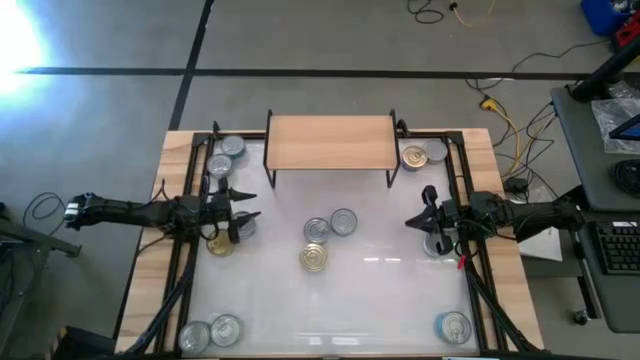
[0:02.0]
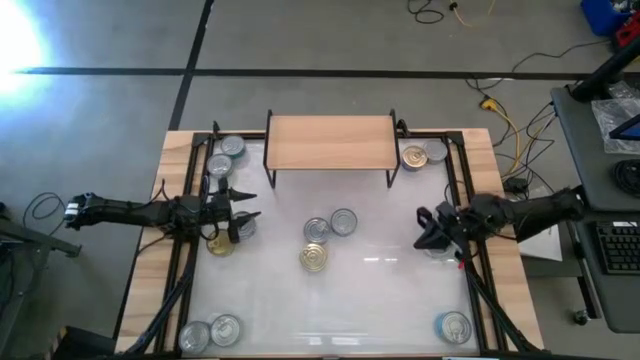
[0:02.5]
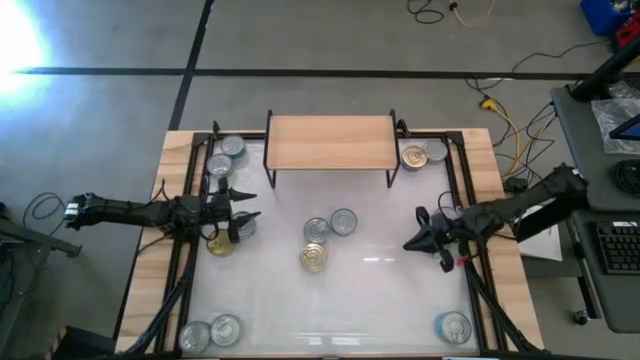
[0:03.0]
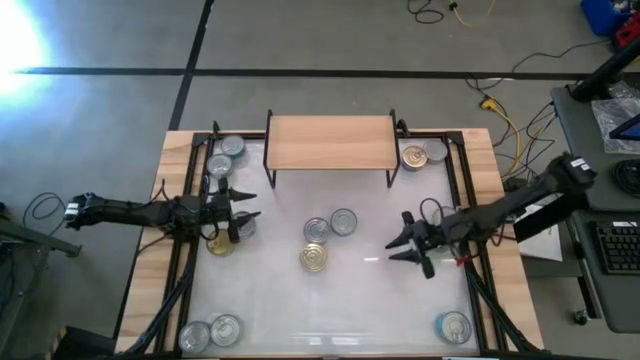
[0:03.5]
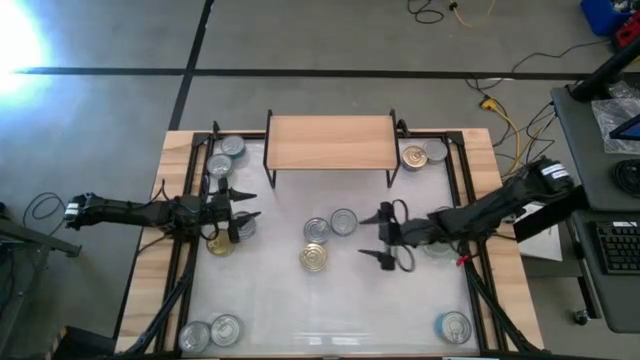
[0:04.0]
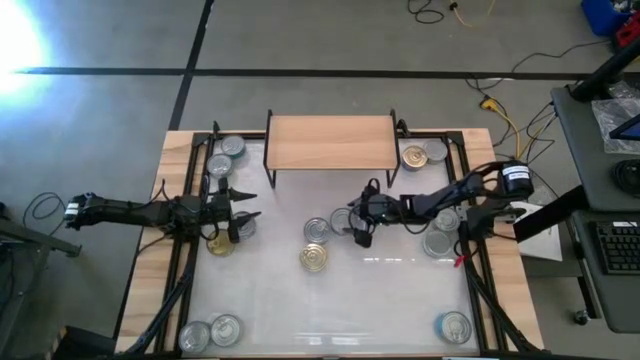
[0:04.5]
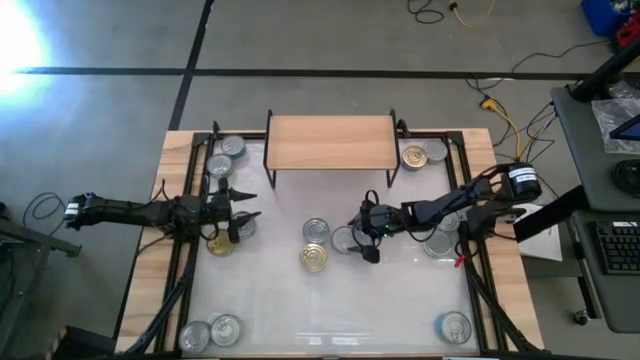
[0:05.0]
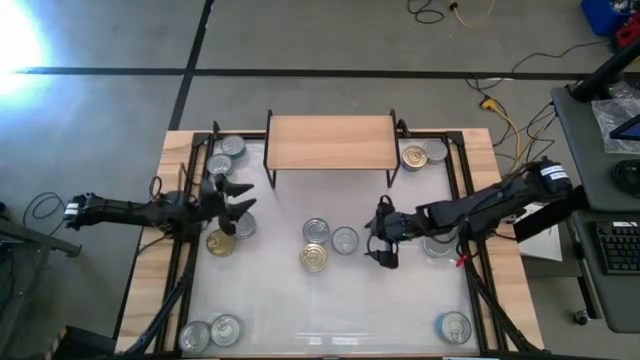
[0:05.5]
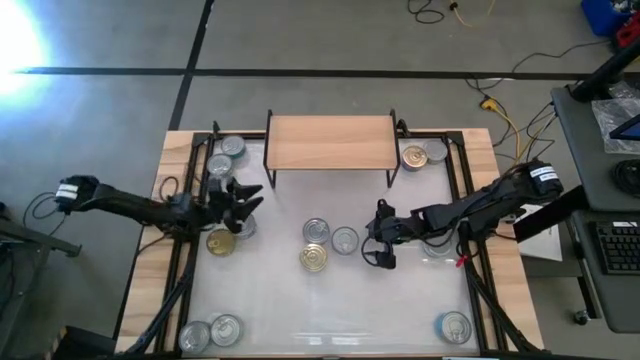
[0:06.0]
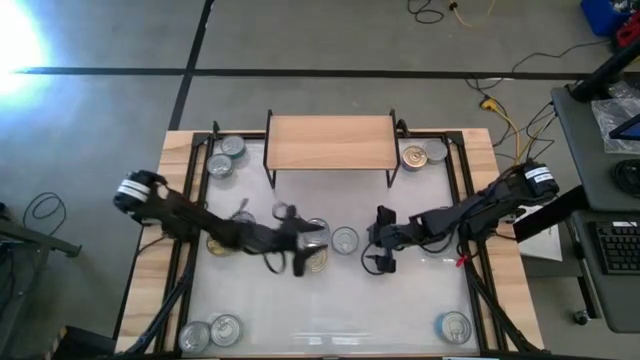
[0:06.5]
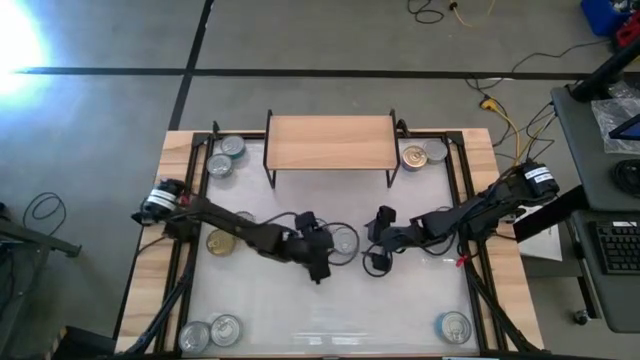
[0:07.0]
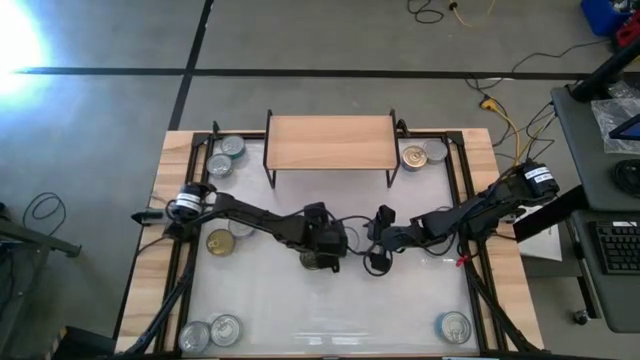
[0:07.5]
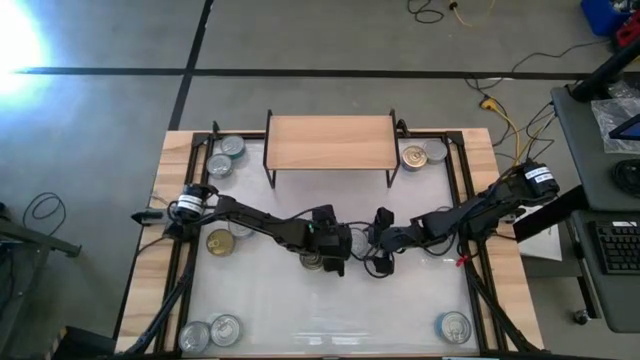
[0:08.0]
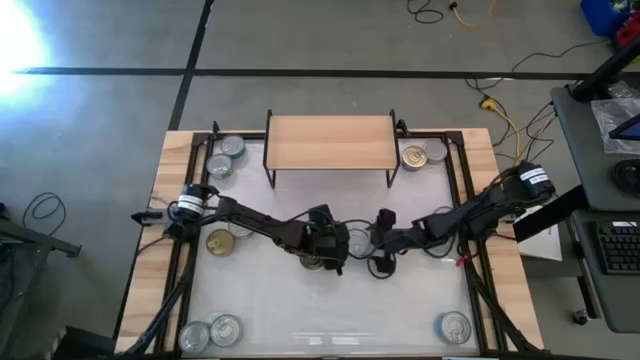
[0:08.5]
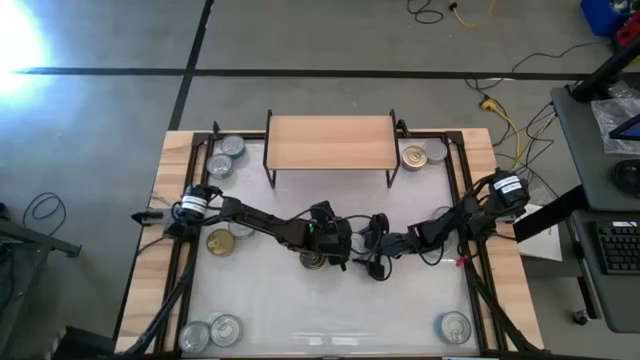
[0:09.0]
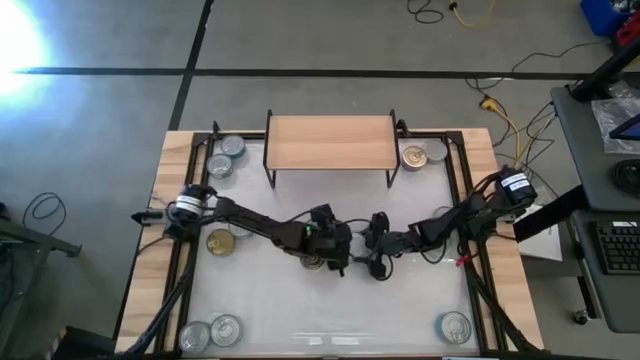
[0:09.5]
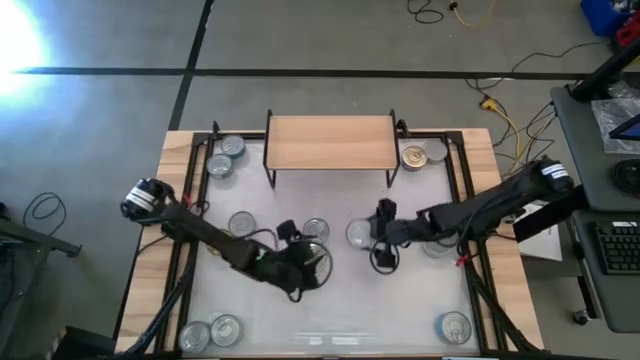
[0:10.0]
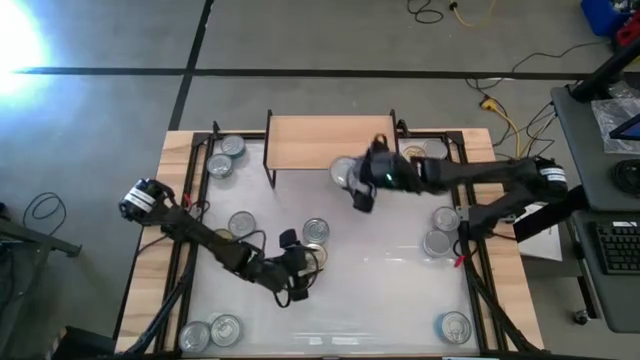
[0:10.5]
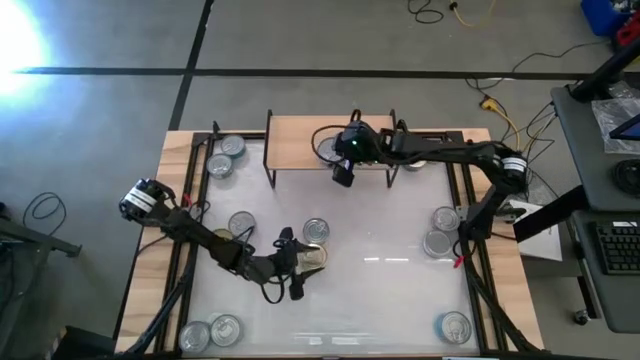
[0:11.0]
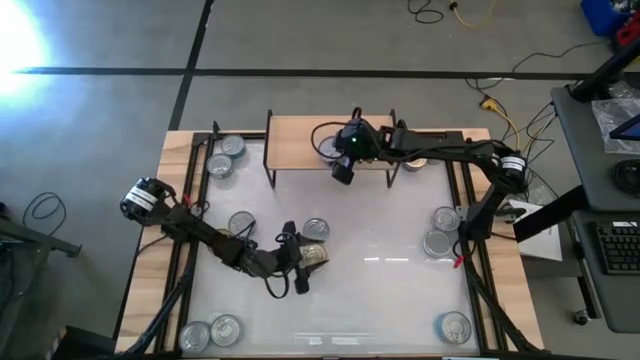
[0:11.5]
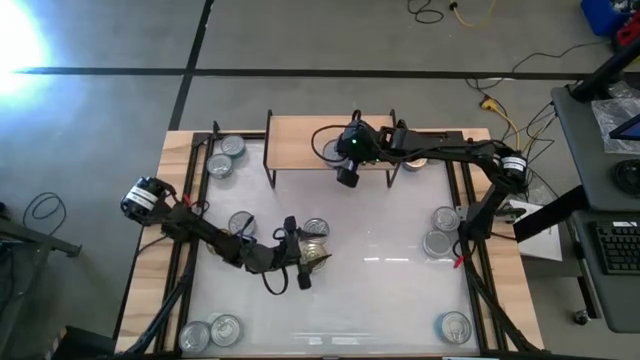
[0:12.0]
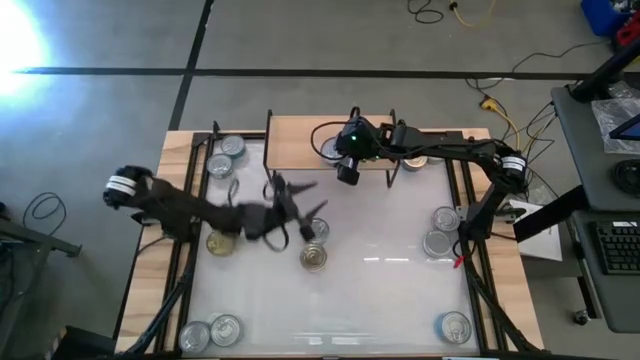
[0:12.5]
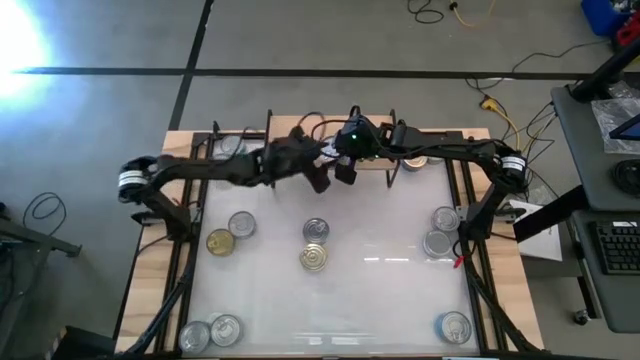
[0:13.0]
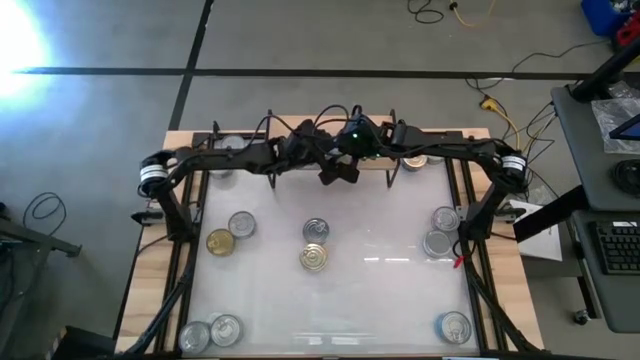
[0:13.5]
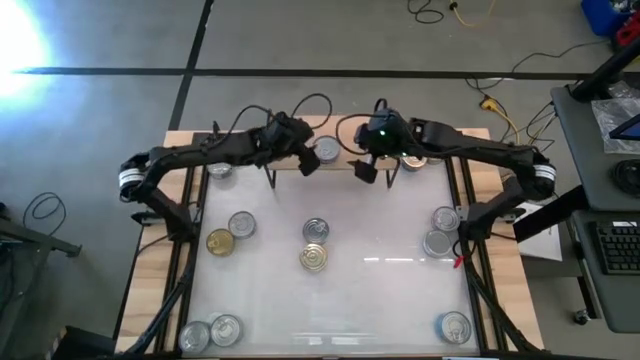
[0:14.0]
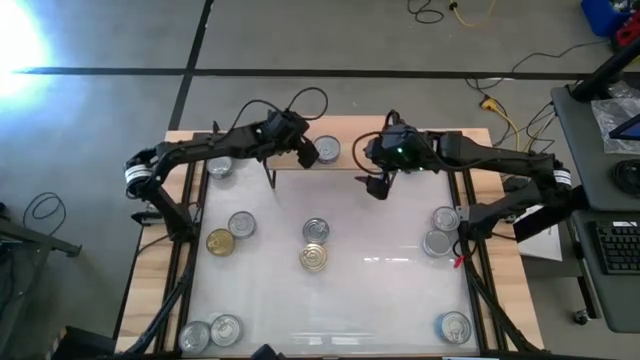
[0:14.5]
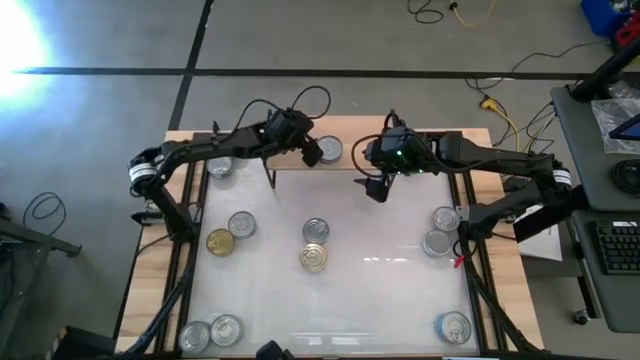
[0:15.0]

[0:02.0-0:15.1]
Task: Stack canned seafood by type on shelf
Put the right blue tuna can on the shelf

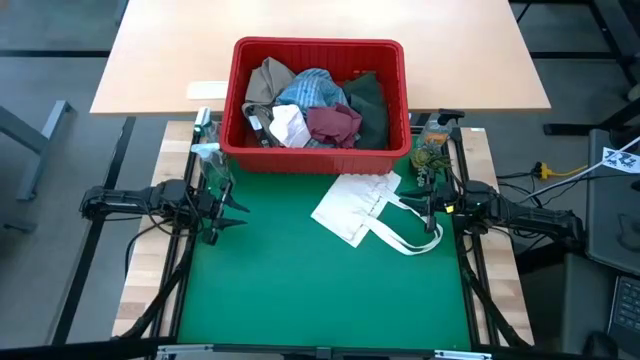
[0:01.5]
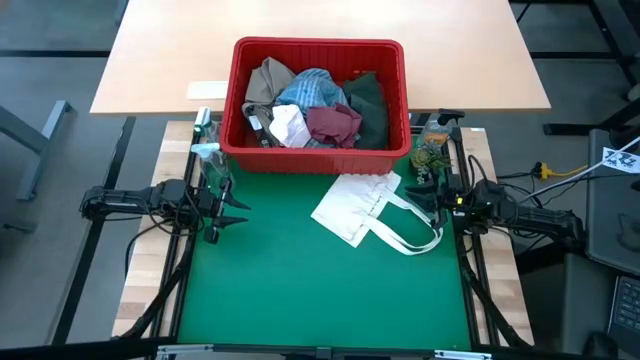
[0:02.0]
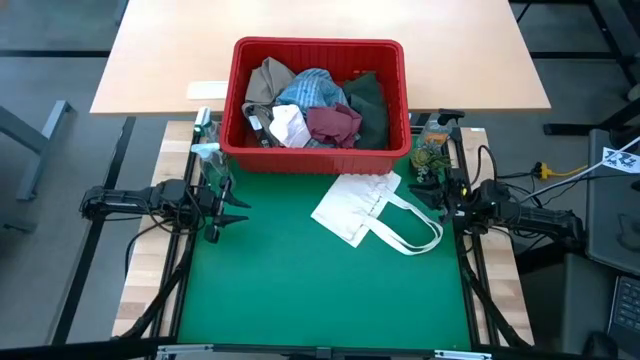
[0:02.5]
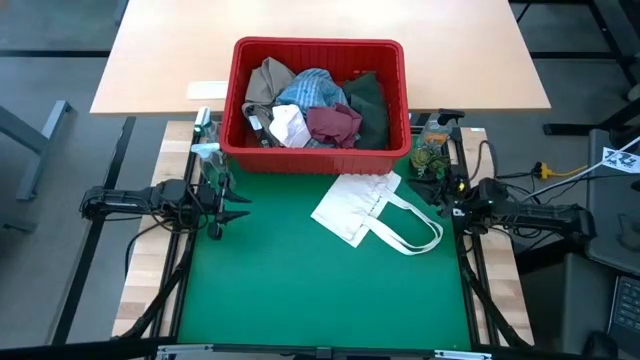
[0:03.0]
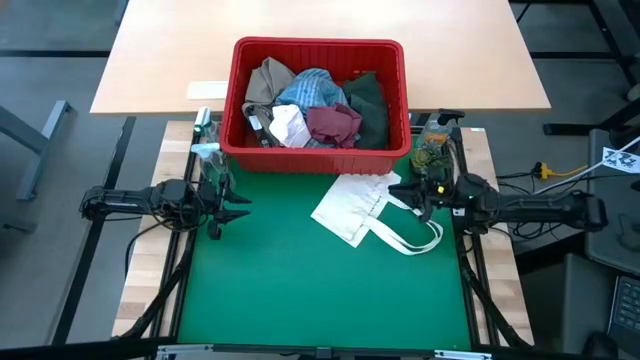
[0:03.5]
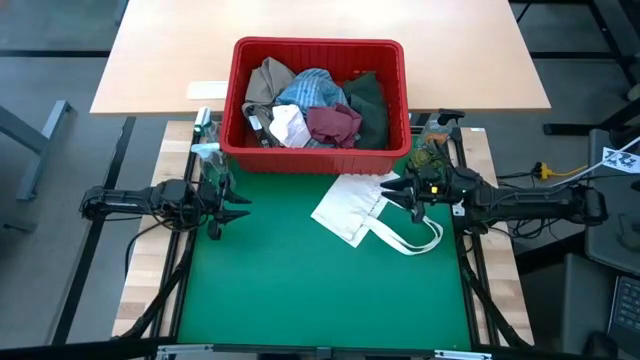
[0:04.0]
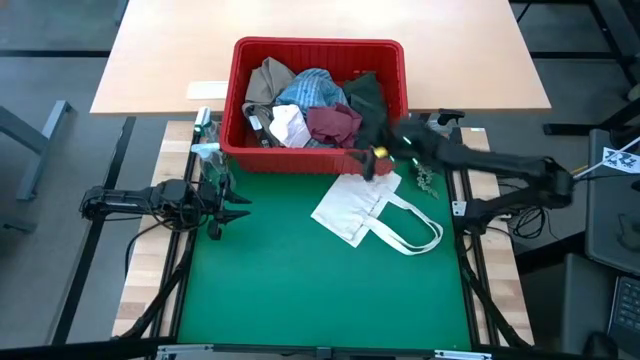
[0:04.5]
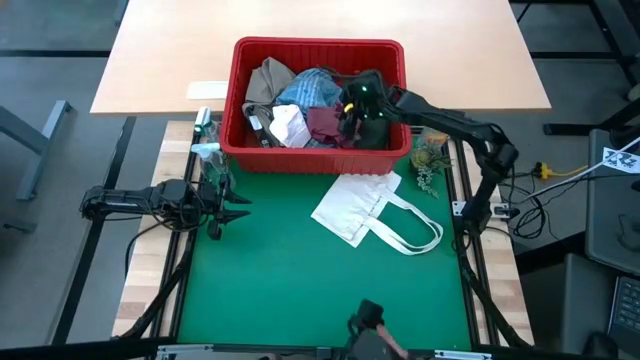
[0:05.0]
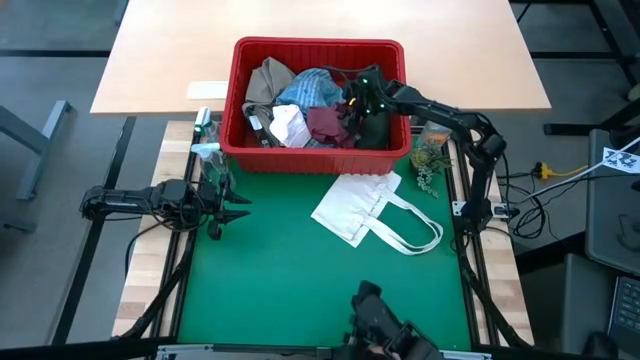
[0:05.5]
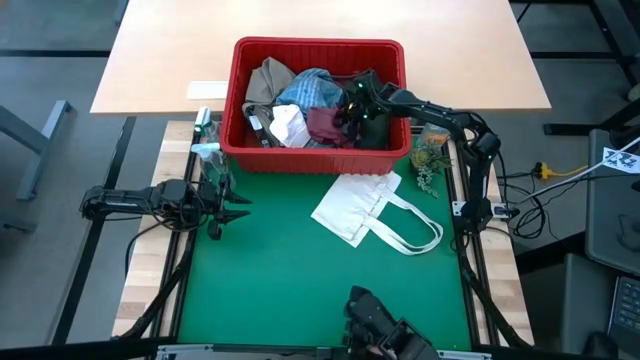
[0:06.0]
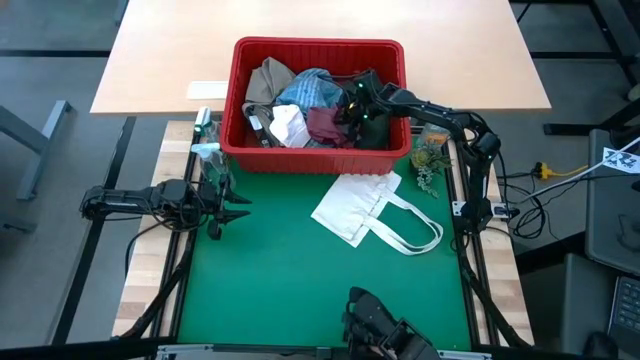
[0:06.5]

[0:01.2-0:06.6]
Task: Fold Laundry from Bin
Remove the pink underwear from the red bin
